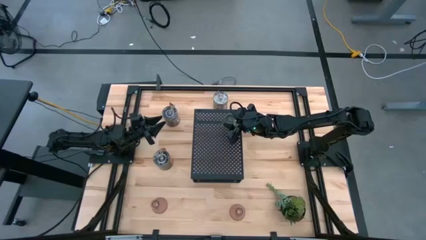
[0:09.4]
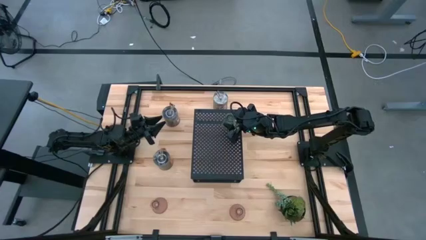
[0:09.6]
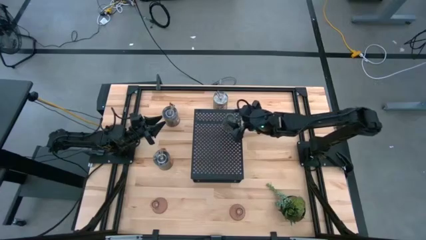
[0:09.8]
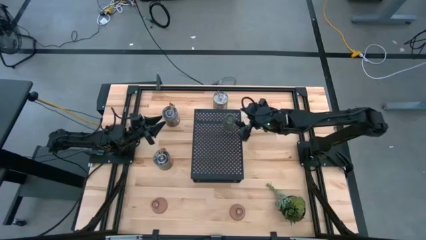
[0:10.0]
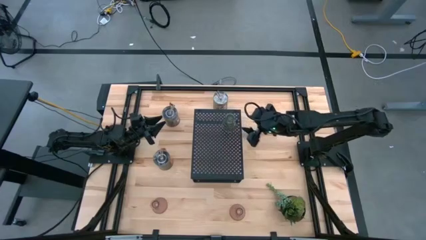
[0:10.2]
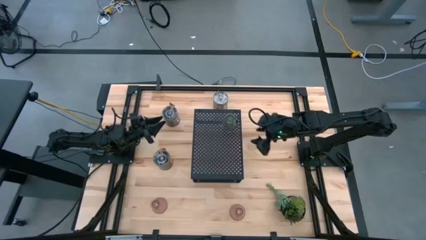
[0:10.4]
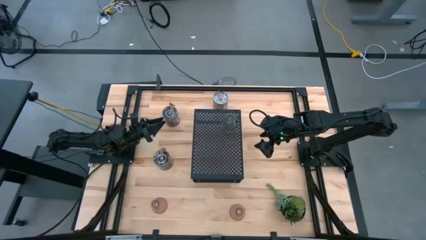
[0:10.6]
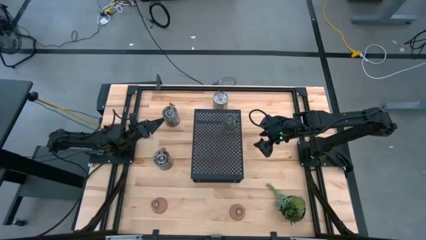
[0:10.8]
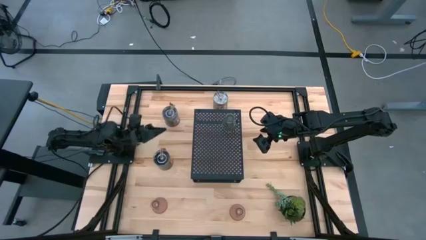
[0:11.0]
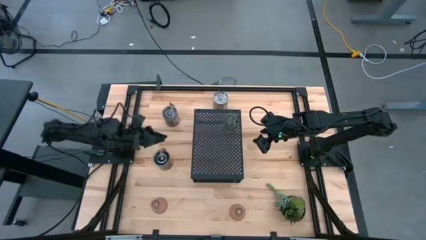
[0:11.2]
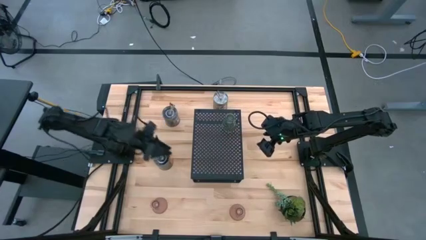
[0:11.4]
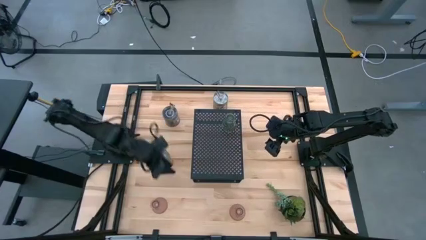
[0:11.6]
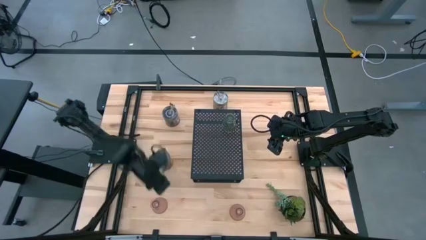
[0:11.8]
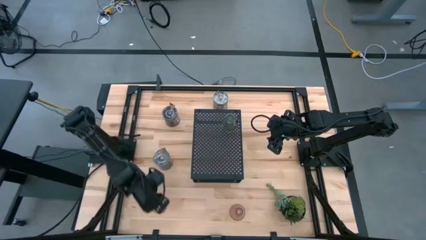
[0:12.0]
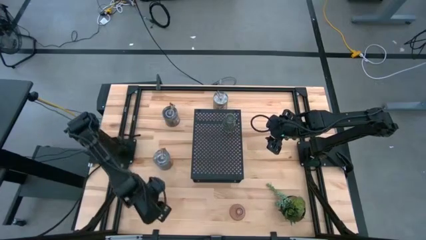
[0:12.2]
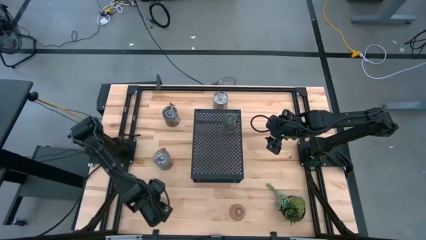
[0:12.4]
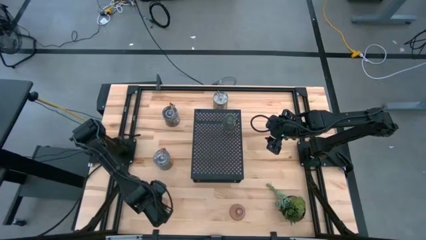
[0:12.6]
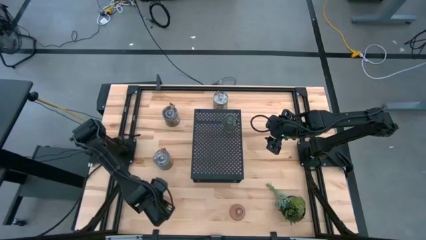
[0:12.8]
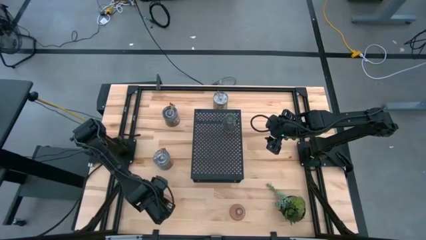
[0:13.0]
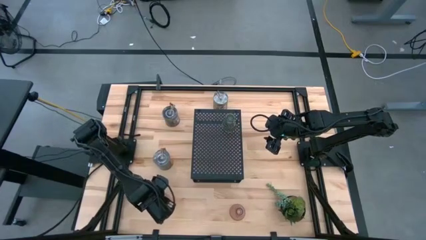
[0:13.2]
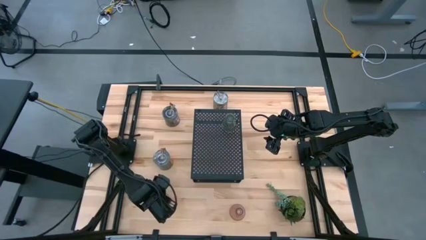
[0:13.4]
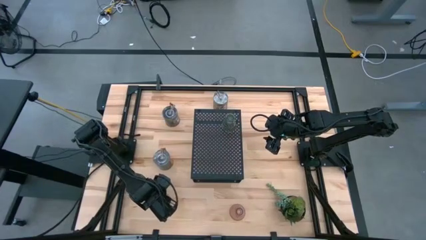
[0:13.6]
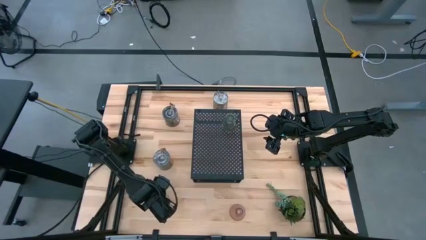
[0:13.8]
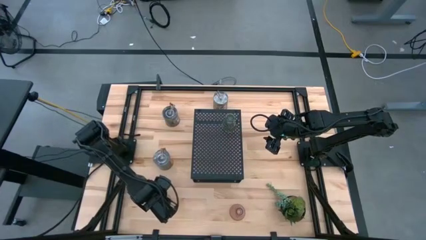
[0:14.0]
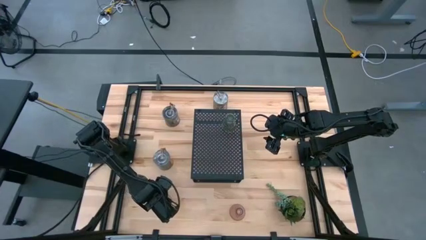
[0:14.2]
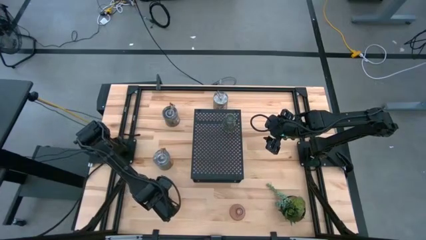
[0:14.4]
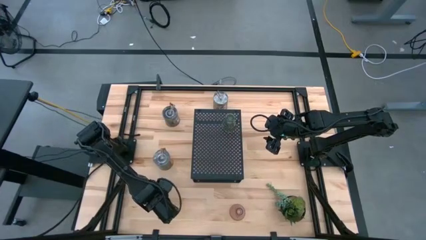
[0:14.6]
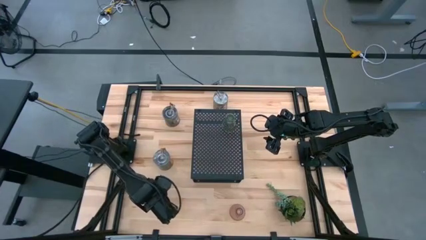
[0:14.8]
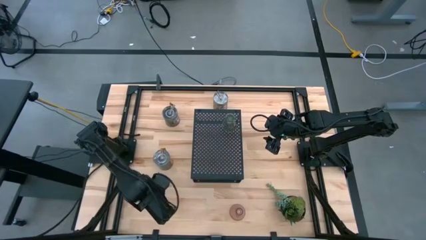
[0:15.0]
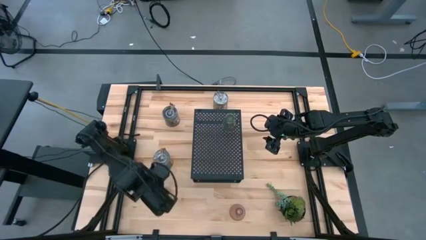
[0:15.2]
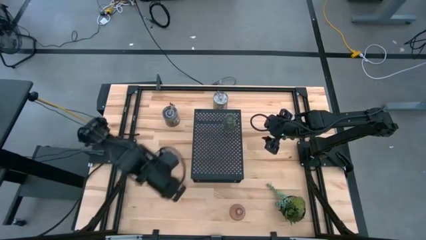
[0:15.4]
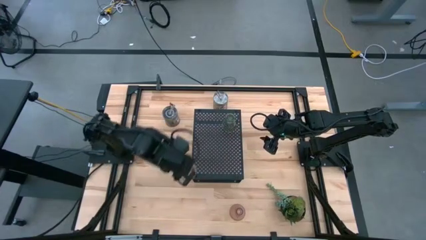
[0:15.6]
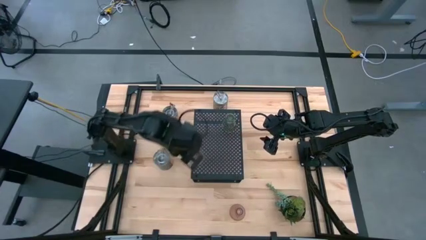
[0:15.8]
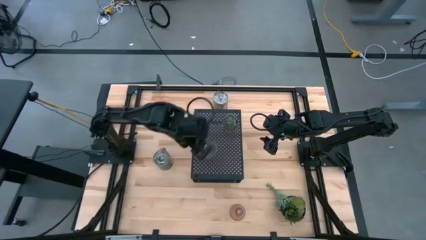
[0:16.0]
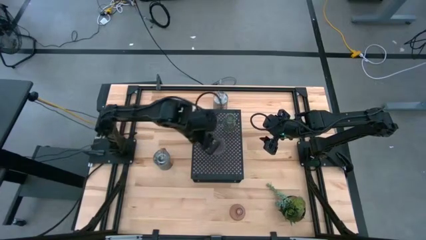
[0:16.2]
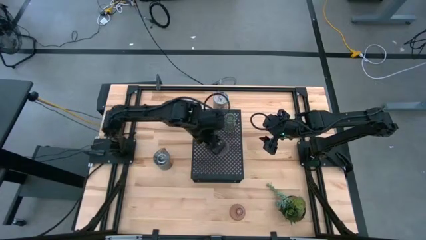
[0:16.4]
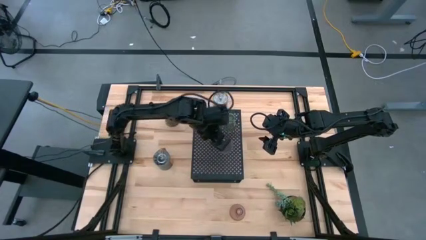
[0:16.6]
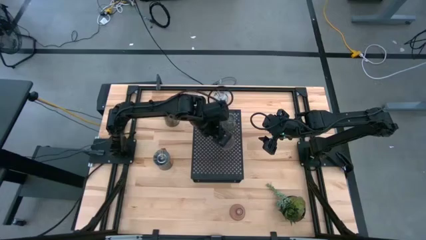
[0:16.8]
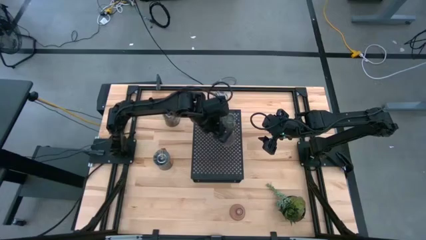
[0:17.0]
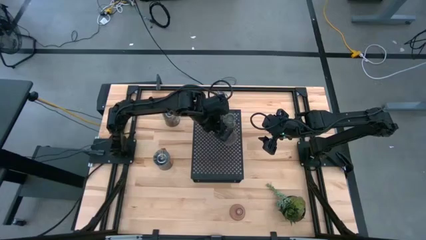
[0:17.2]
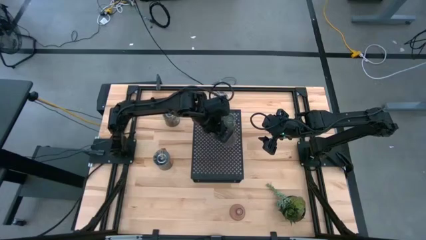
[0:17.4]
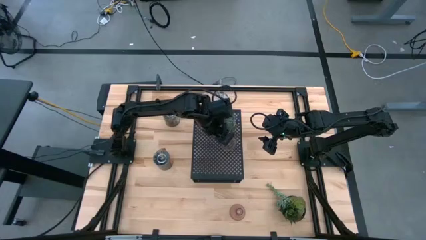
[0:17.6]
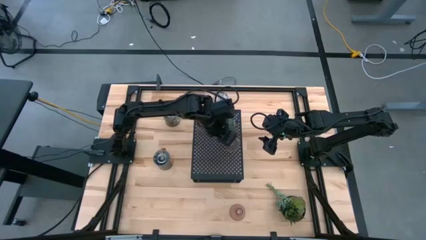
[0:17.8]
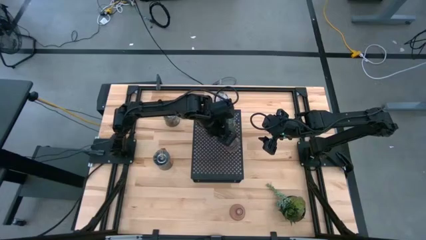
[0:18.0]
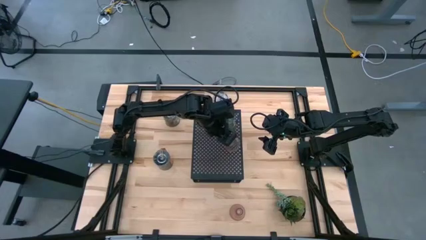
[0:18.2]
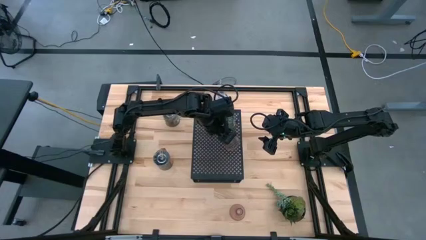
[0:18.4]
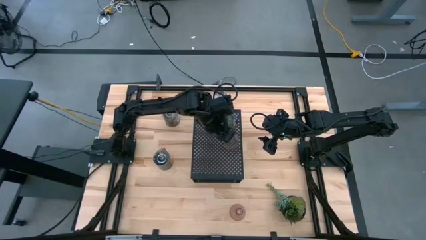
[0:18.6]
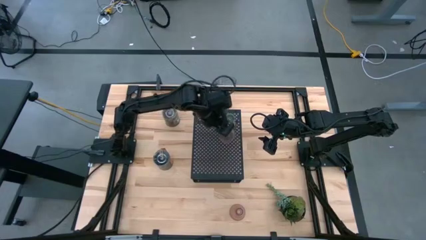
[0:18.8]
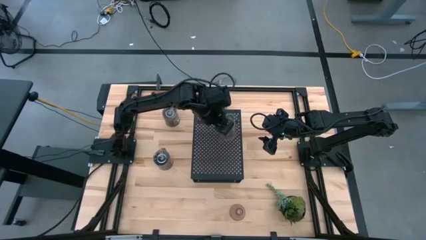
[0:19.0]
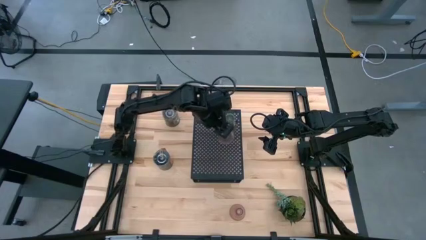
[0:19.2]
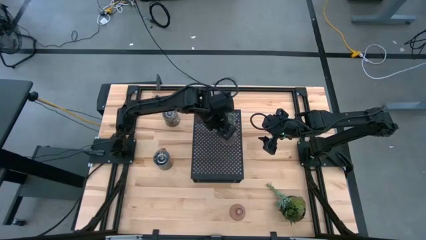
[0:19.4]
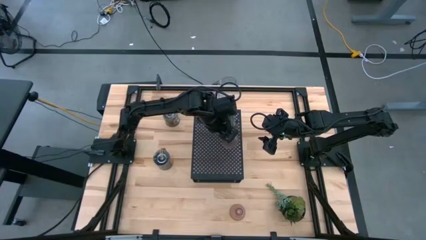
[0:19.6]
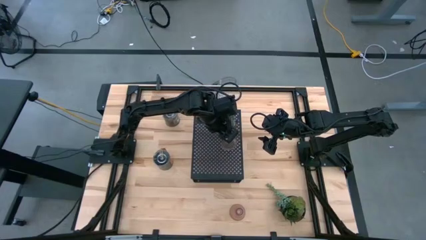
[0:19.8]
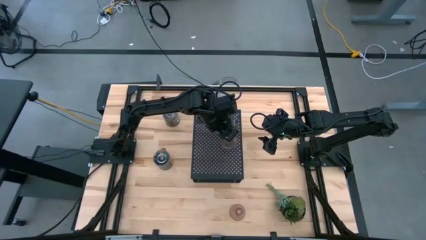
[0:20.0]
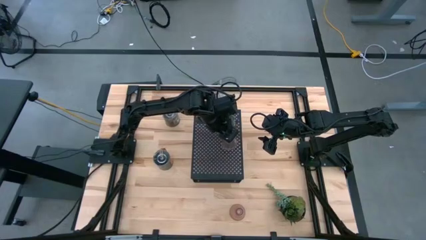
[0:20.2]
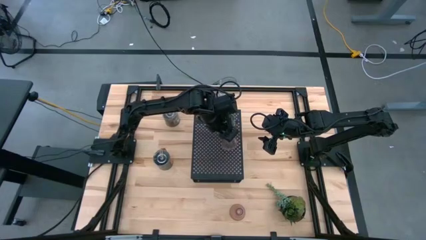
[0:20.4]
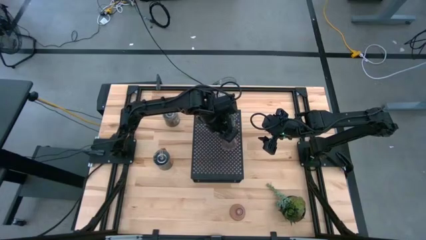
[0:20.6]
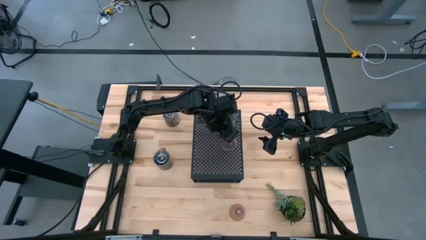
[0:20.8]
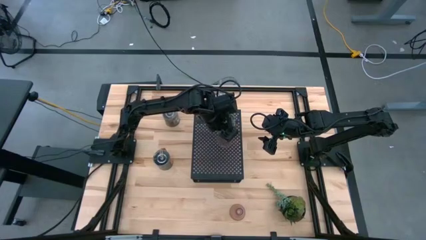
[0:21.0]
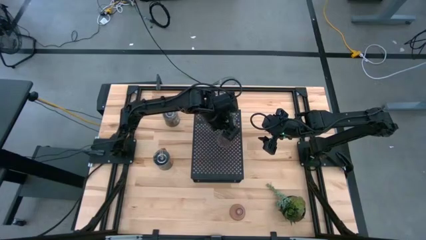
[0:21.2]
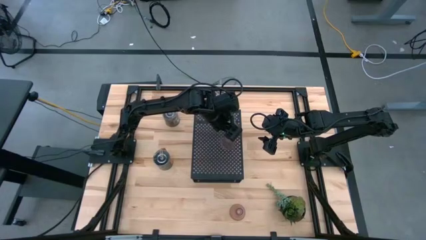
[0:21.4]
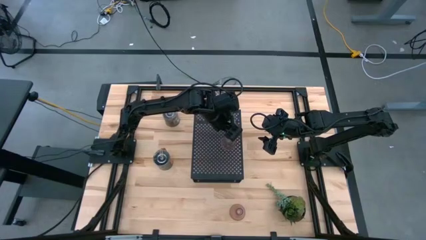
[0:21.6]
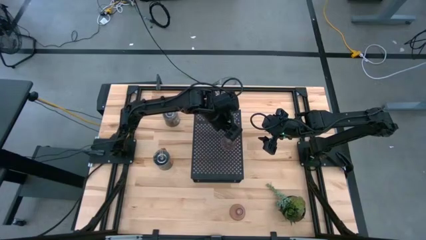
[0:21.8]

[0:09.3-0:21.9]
Task: Pick & Place candle stick holders
Put the left pink glass candle holder on the shelf aligned with the green glass candle holder

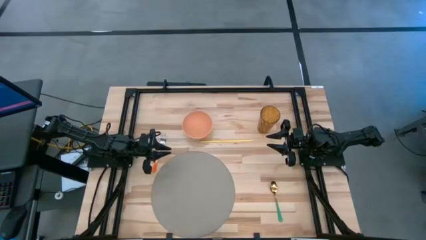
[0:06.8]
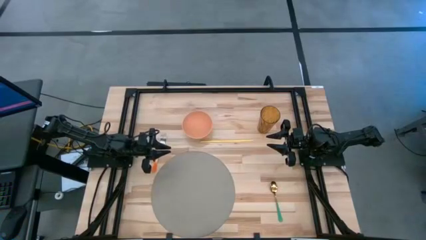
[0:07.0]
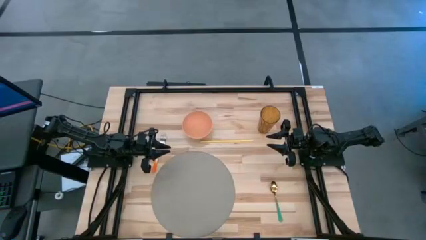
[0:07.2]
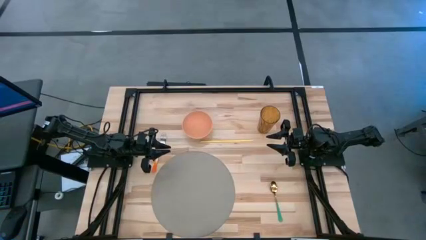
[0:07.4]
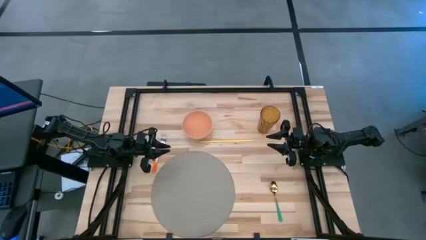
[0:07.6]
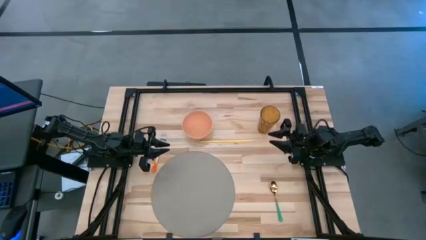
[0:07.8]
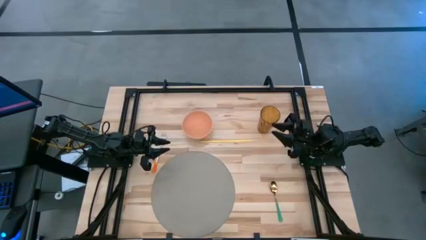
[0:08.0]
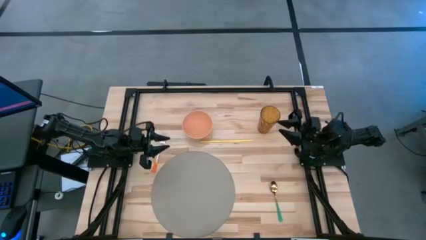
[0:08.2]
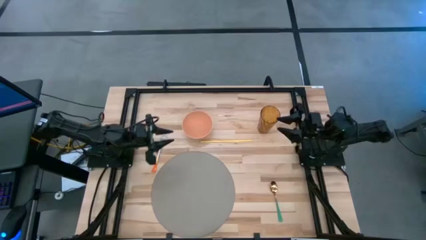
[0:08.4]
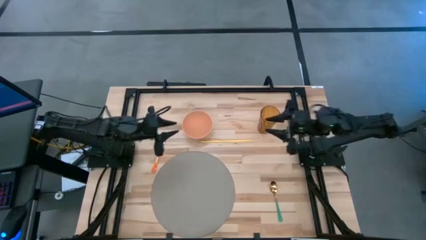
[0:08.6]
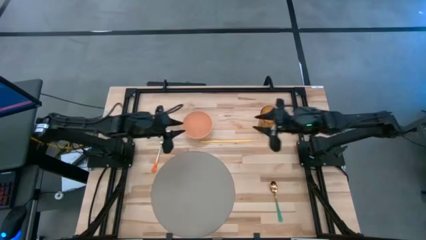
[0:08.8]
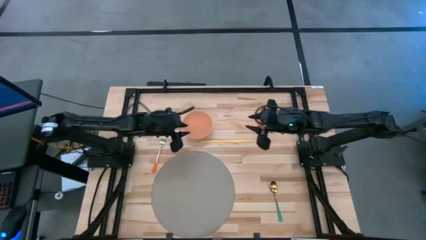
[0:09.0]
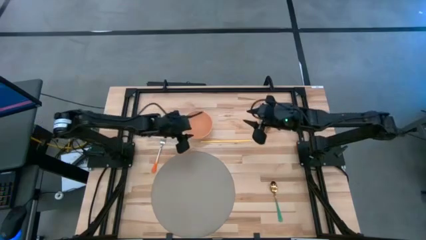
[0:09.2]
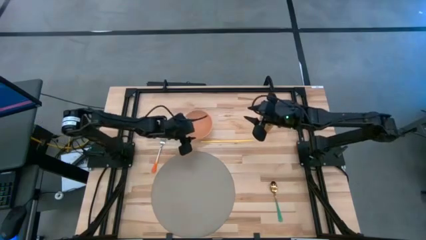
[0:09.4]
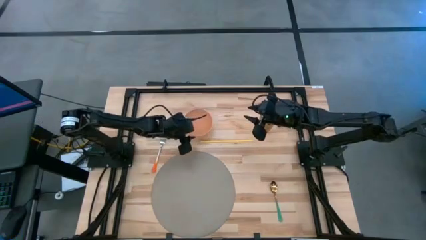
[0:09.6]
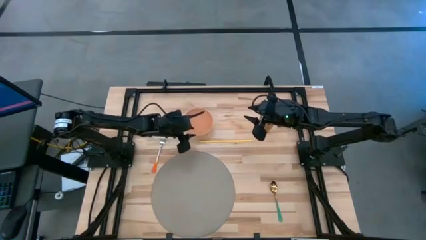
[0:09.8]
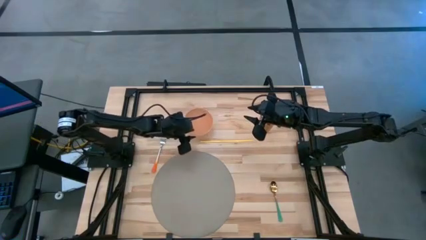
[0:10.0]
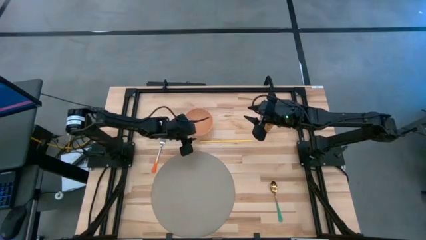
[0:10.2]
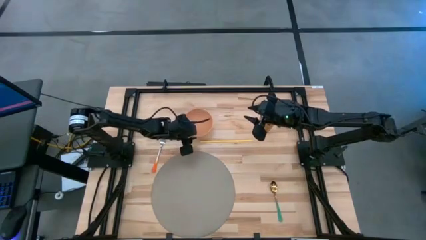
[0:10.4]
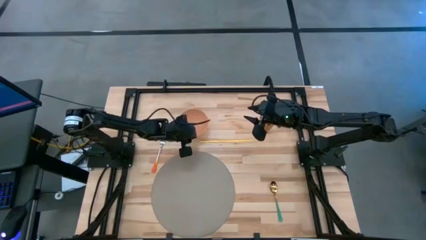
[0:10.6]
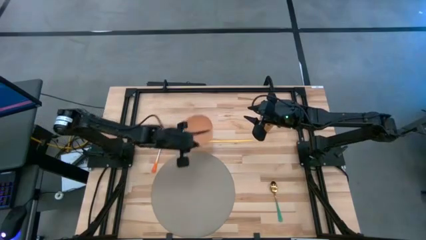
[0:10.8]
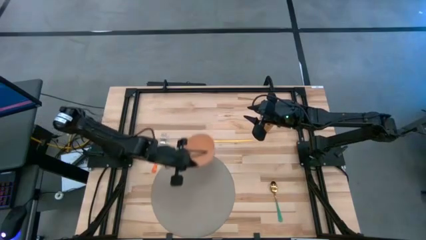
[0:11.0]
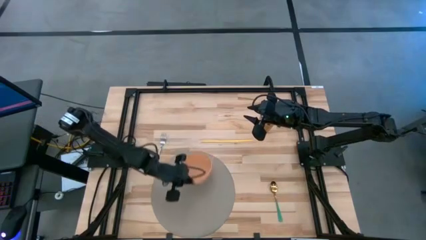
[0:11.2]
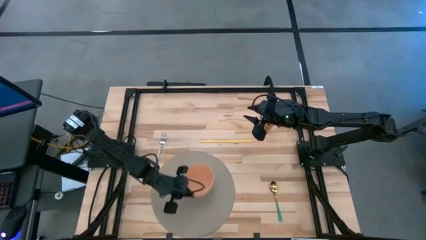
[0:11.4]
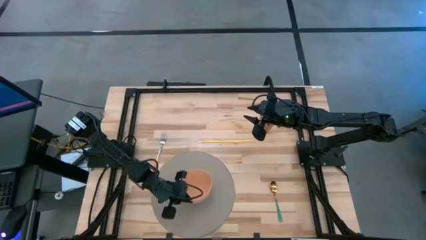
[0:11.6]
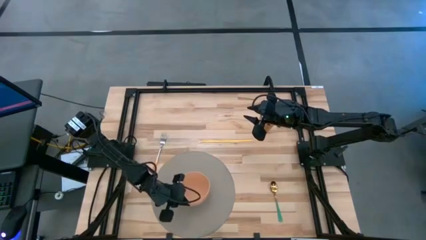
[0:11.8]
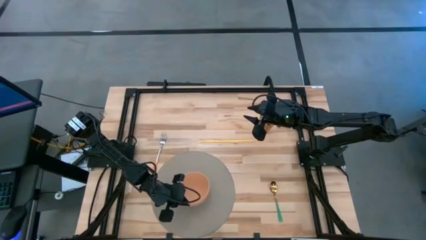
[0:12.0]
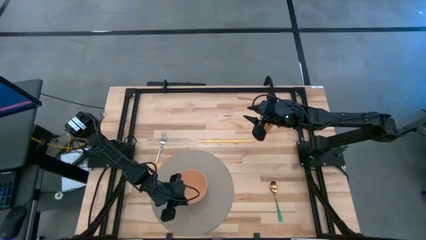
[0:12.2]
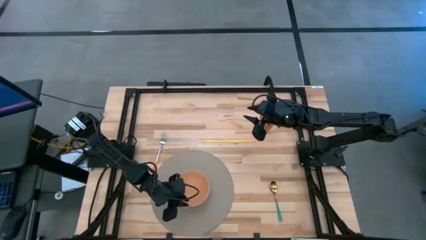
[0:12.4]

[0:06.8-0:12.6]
Task: Pick & Place Utensil
Put the orange bowl on the gray mat
